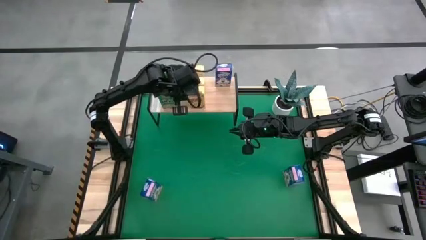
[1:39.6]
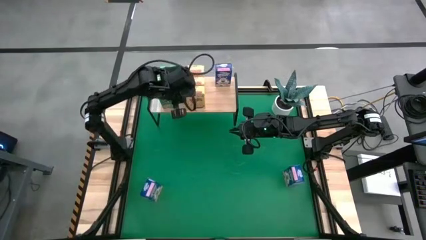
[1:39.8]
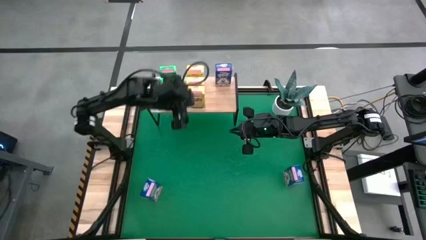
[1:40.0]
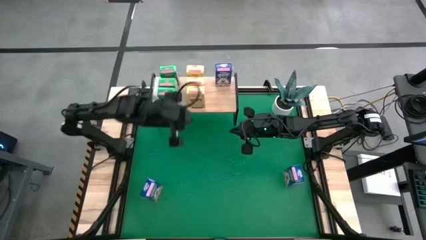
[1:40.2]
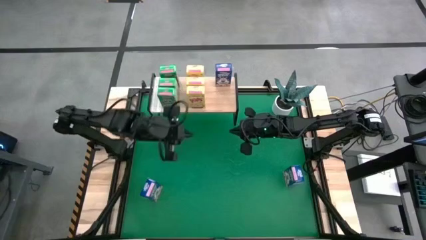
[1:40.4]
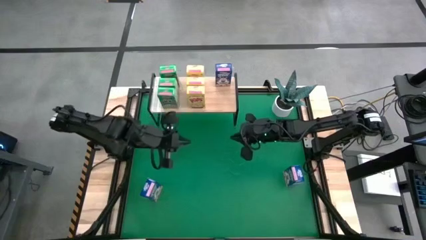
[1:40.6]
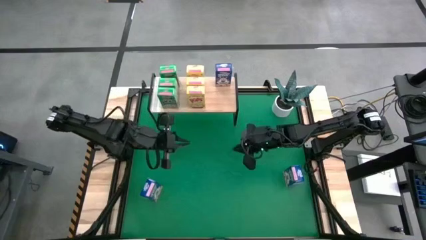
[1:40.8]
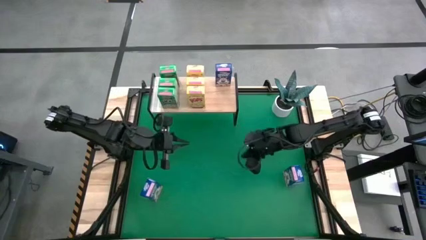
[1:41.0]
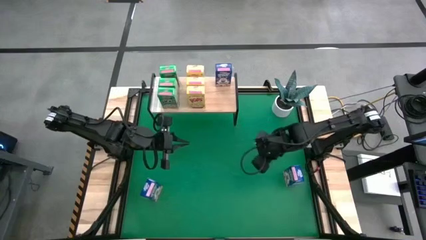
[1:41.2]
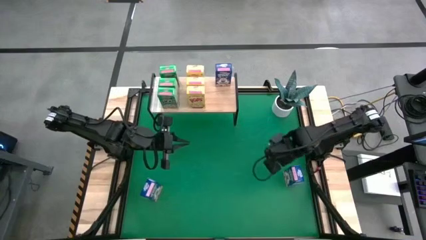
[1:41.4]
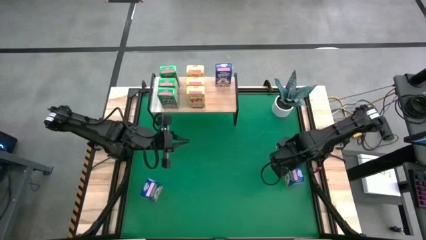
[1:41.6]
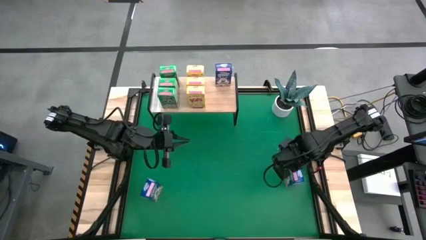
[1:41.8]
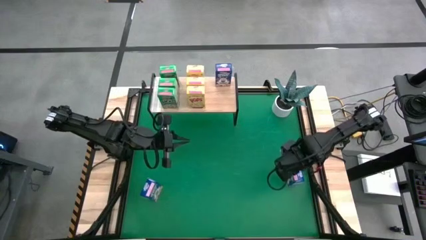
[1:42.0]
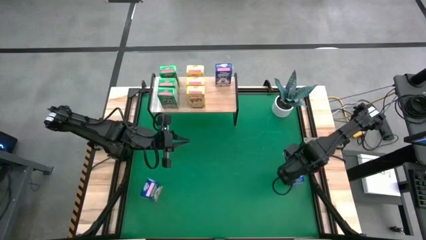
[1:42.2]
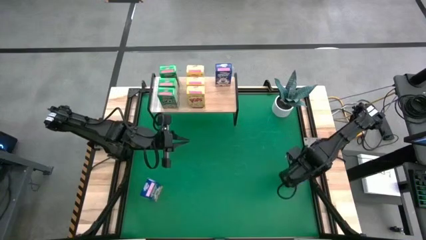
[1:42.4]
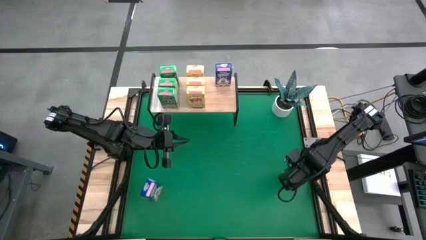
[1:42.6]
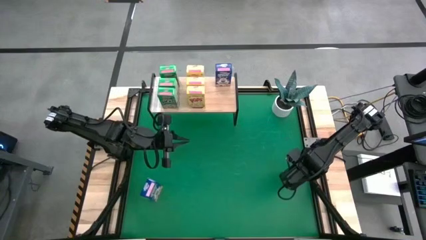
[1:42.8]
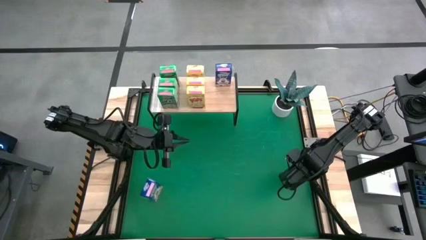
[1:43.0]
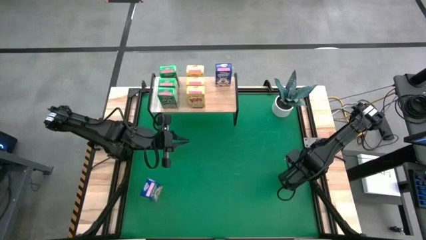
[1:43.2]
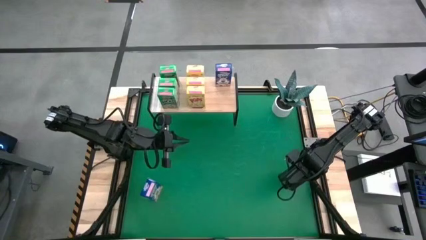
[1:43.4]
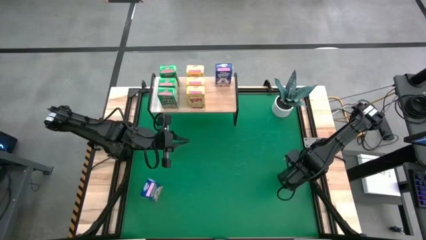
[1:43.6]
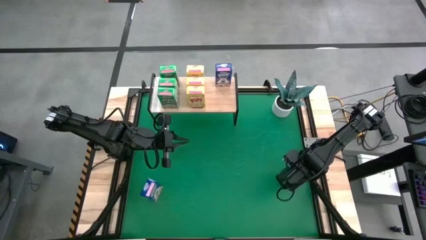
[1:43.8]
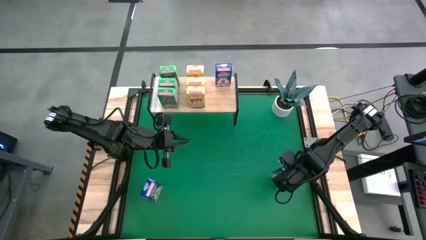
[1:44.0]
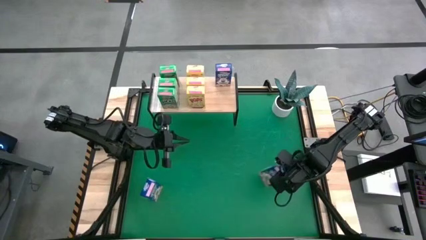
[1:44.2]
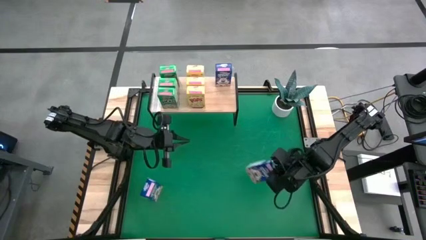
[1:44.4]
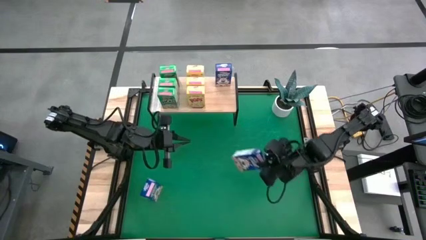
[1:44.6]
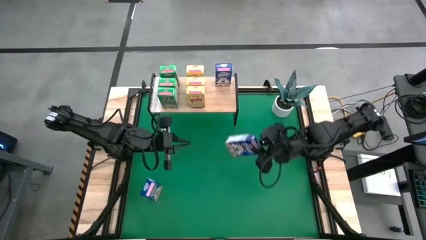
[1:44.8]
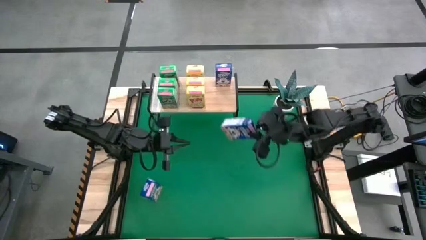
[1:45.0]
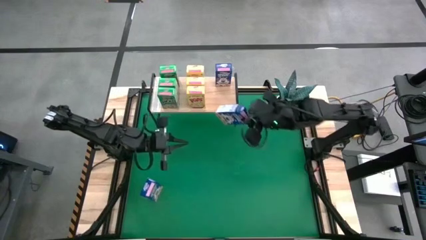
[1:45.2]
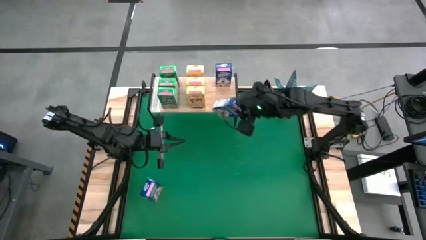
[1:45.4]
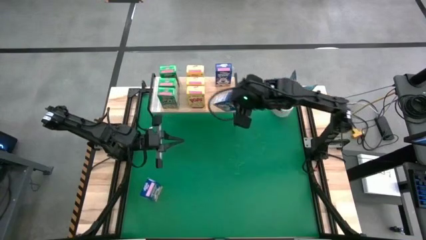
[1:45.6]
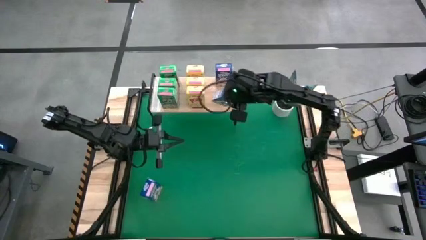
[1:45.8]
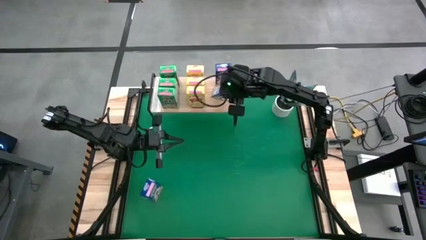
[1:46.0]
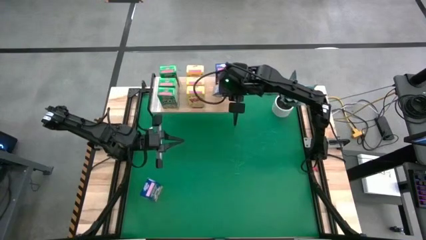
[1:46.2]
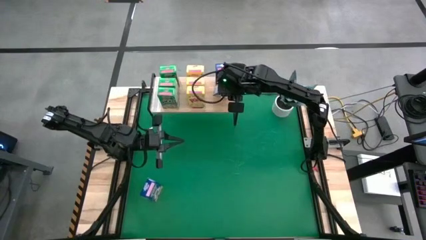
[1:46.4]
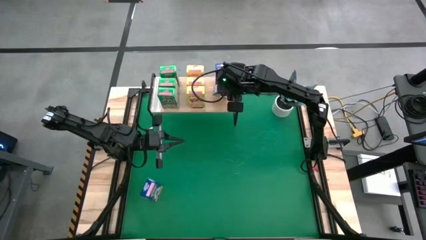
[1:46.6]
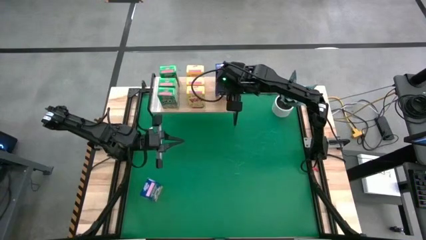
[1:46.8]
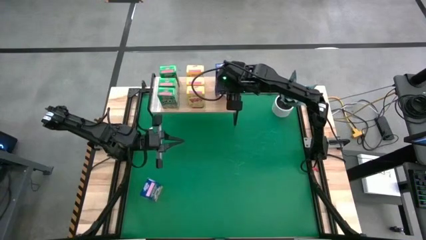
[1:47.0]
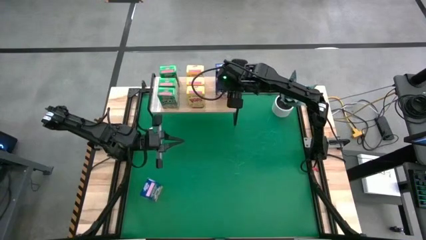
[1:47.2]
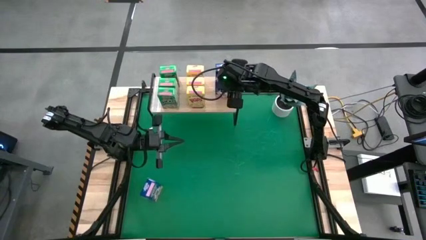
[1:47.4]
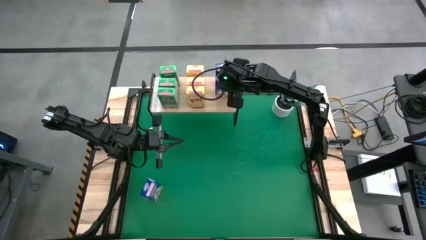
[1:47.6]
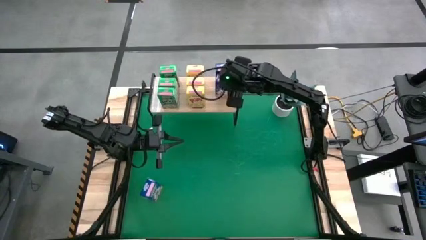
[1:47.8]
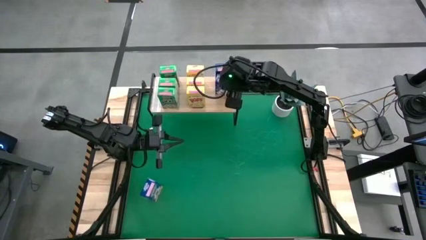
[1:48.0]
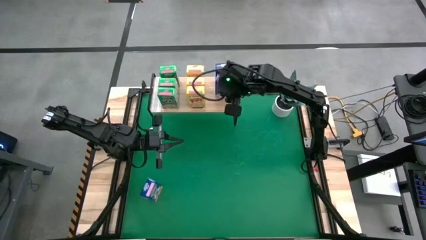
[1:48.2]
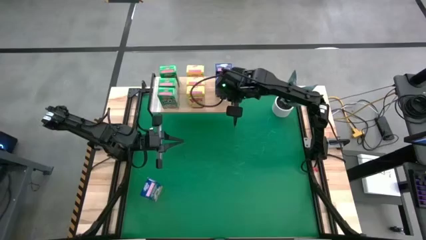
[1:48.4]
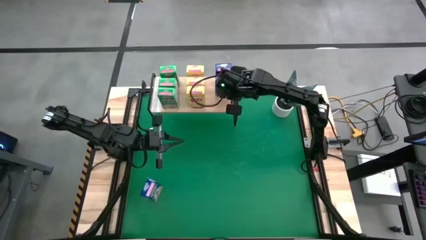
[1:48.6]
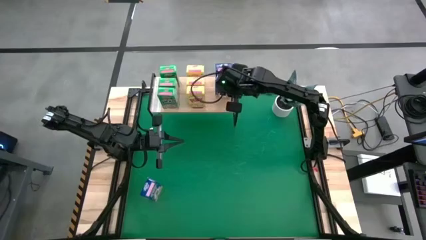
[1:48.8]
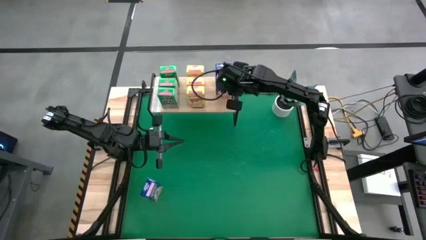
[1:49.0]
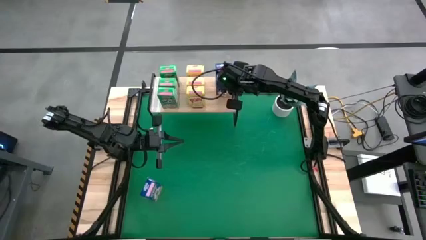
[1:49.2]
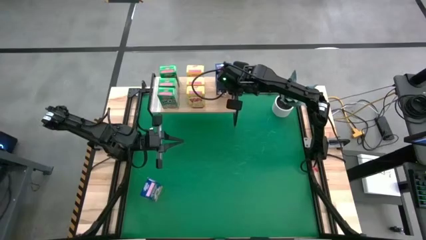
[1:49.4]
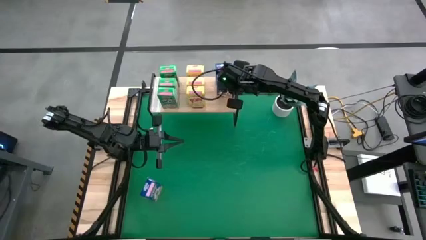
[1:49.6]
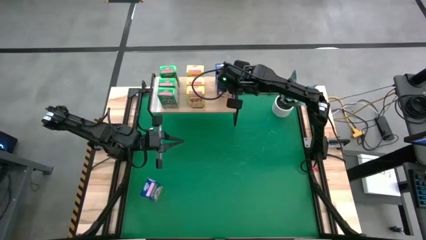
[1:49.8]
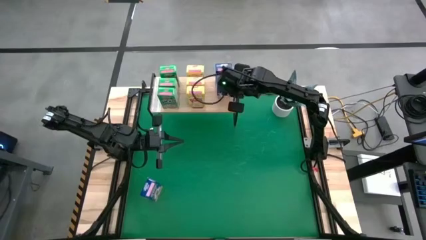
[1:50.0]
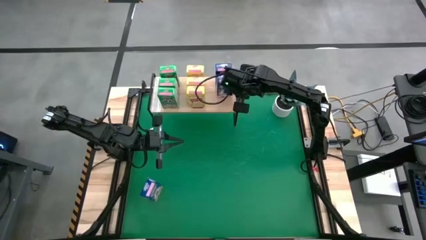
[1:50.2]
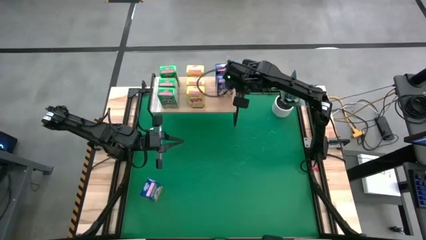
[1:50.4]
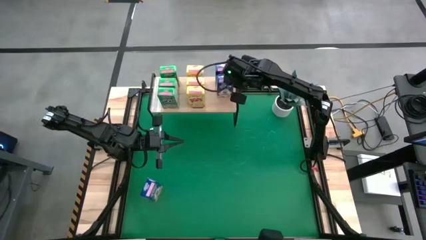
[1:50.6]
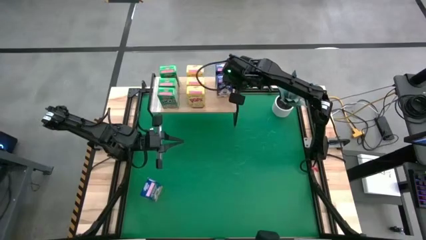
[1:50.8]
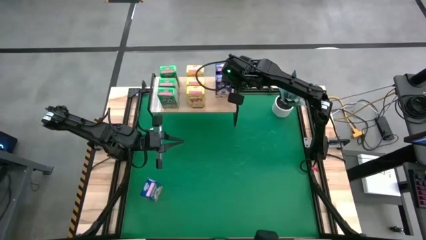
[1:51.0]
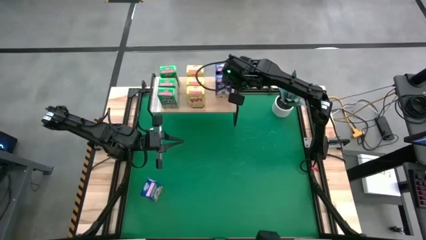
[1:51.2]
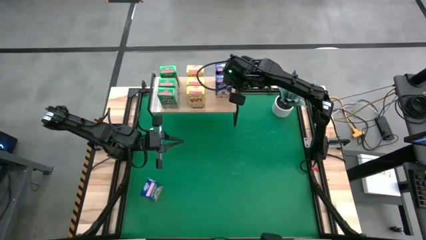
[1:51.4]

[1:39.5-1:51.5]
Task: Stack cereal on shelf
Put the right blue cereal box on the shelf aligned with the other blue cereal box

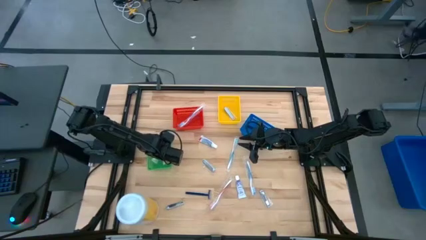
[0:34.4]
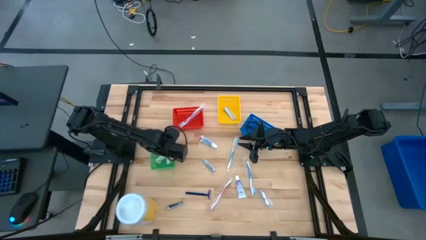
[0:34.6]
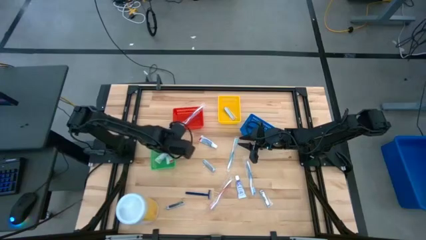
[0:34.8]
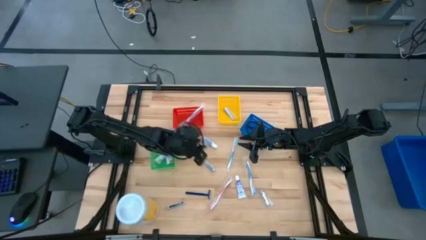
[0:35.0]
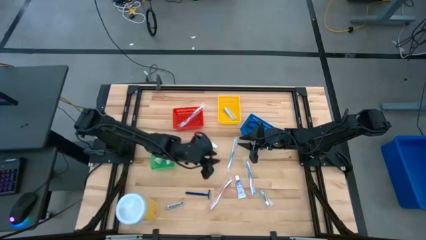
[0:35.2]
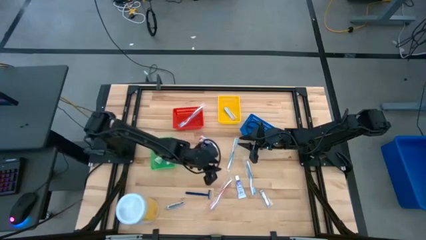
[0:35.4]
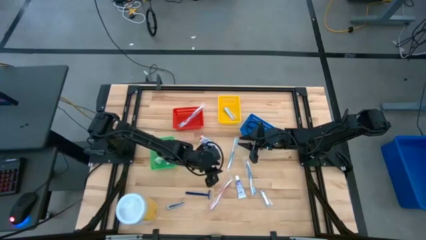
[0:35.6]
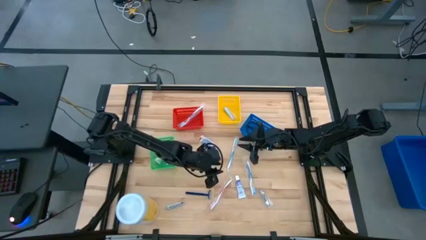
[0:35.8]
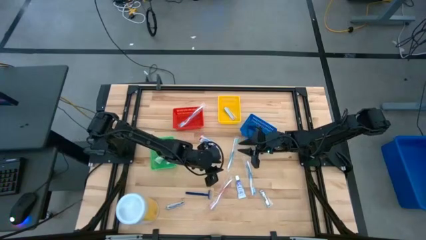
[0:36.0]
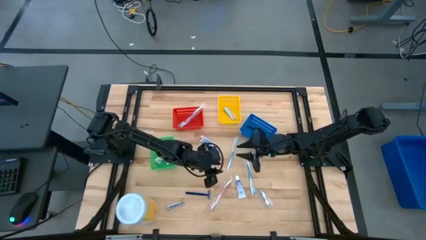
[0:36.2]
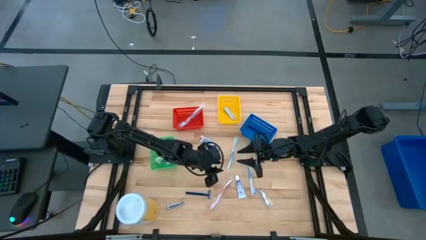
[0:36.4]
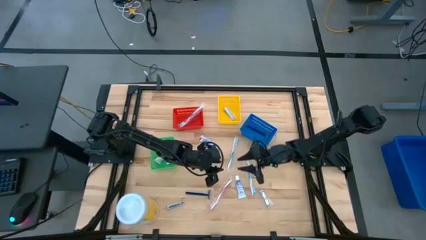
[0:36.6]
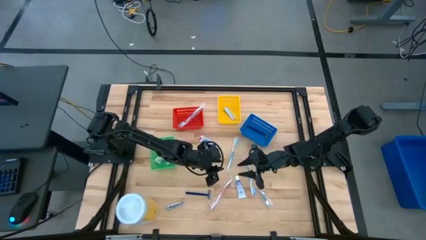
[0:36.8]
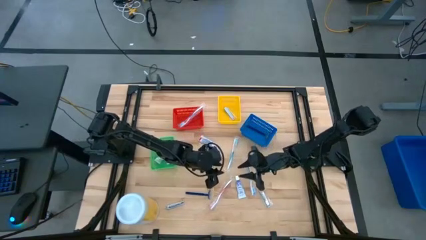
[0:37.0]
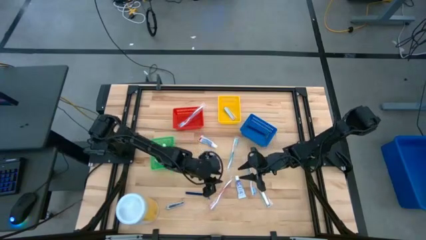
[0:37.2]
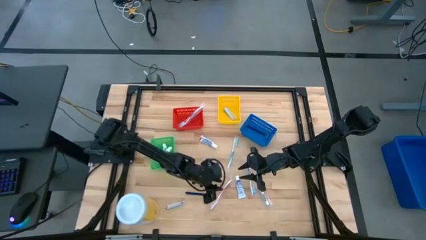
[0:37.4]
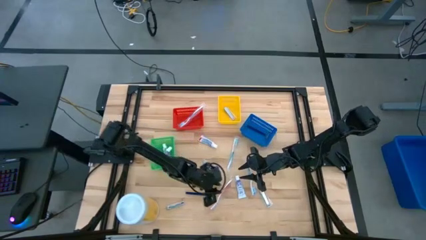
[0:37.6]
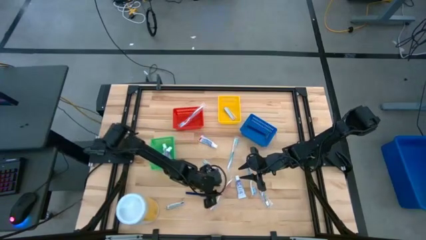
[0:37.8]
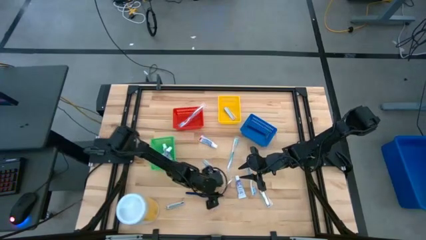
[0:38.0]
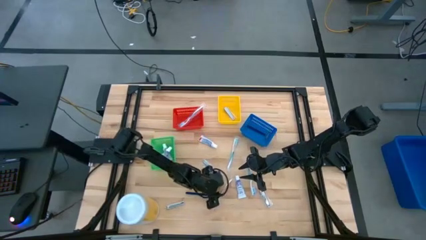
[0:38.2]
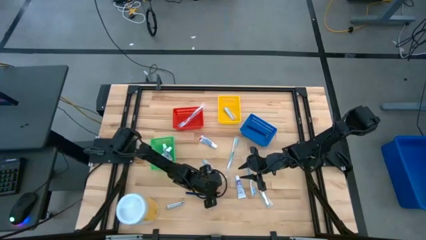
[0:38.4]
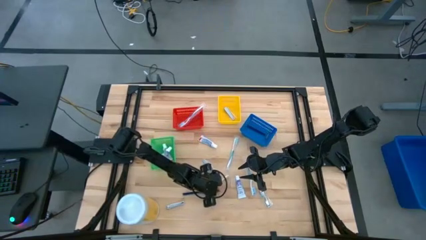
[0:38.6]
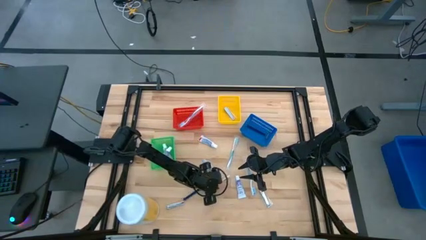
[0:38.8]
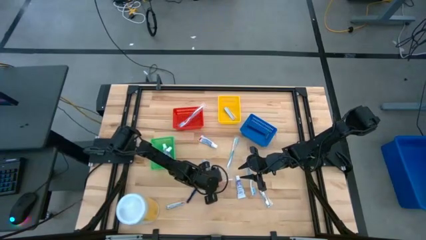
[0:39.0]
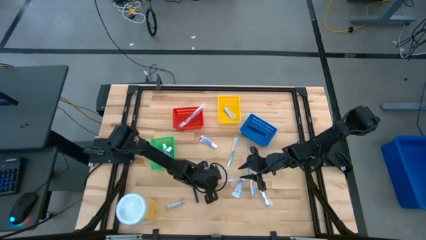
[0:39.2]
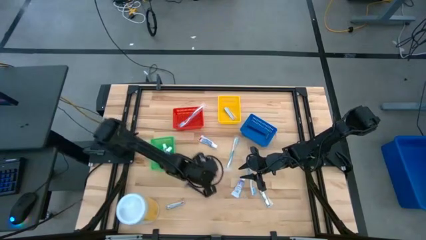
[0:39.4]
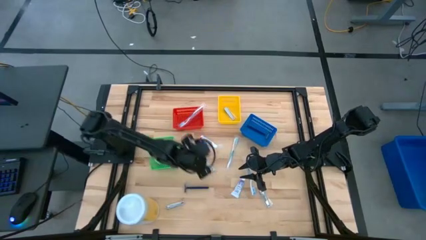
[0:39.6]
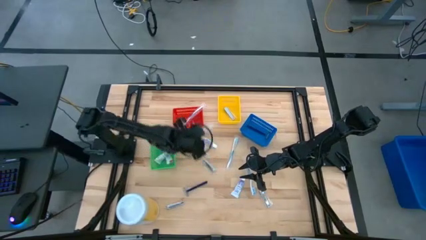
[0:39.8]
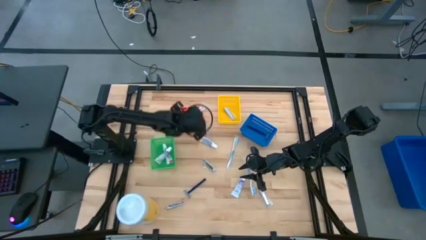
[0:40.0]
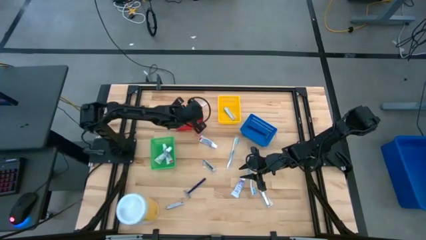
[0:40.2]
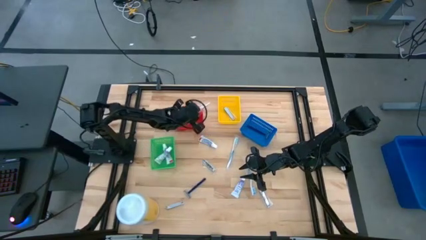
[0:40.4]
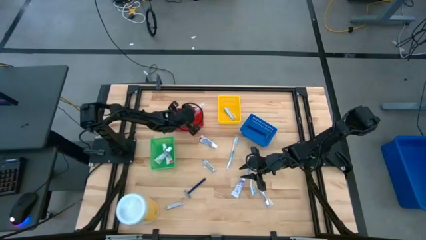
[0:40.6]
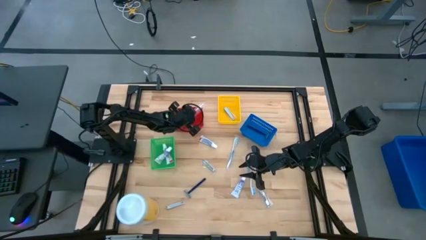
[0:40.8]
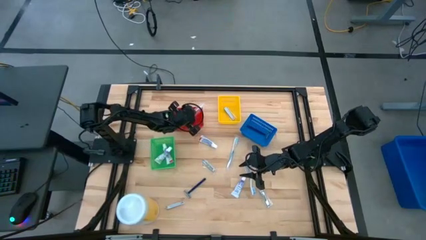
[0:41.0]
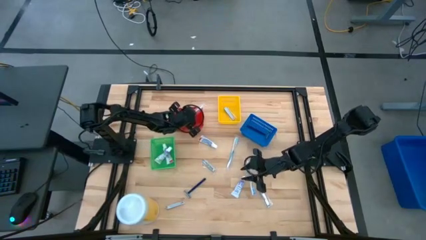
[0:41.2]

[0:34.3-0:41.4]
Task: Pick & Place Travel size toiletries
Put the orange toothbrush into red bin
